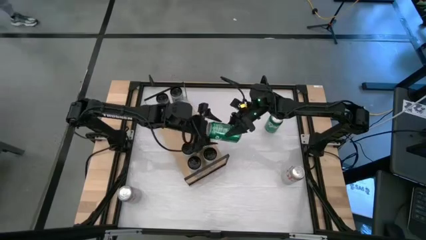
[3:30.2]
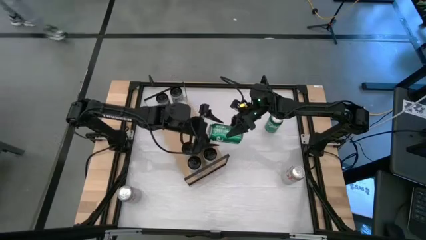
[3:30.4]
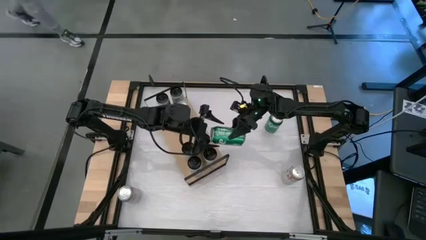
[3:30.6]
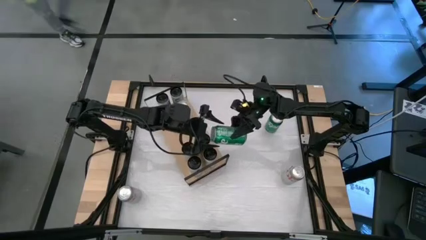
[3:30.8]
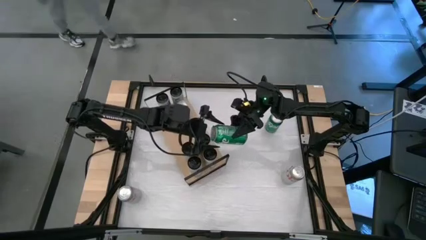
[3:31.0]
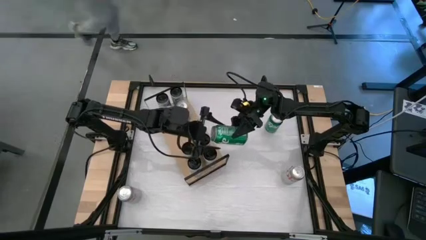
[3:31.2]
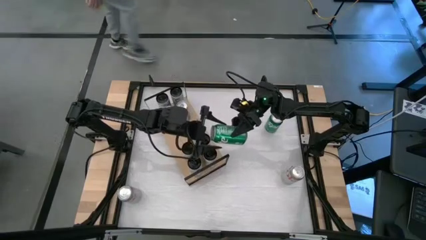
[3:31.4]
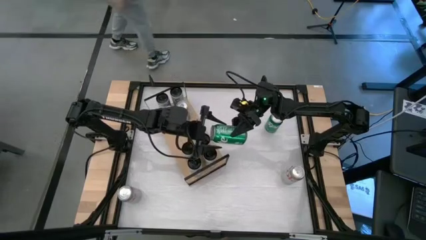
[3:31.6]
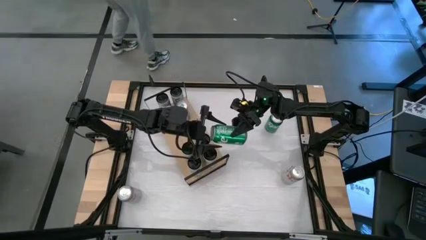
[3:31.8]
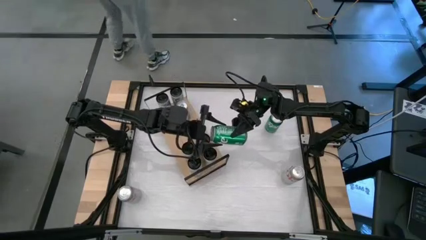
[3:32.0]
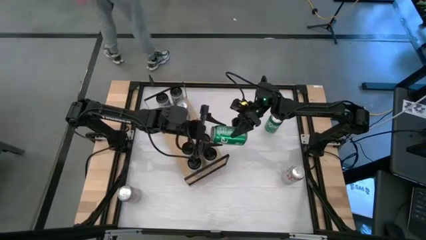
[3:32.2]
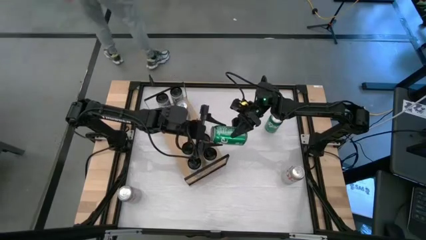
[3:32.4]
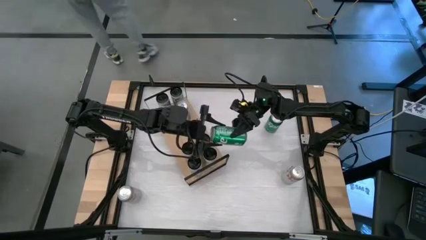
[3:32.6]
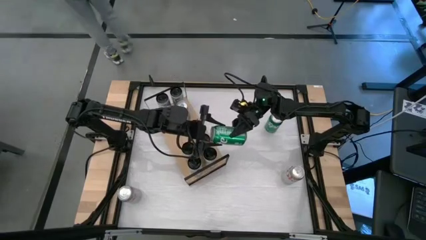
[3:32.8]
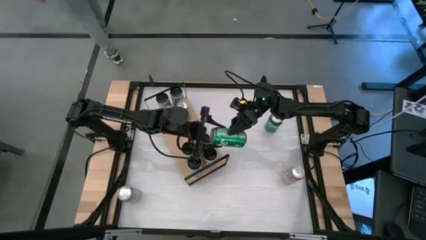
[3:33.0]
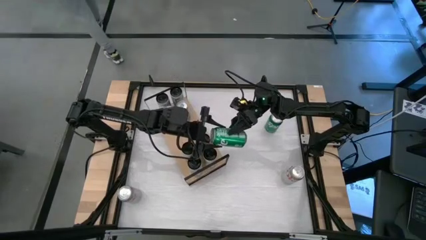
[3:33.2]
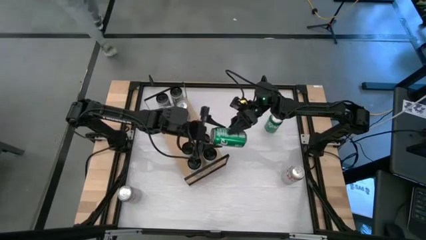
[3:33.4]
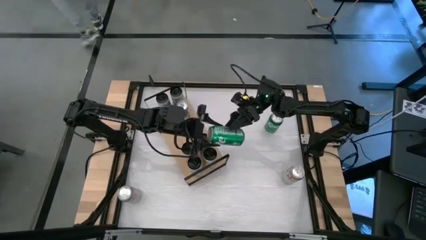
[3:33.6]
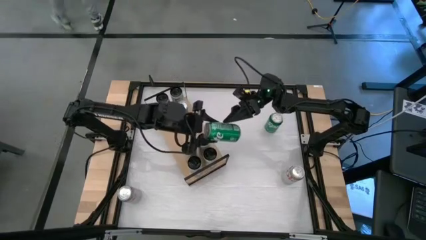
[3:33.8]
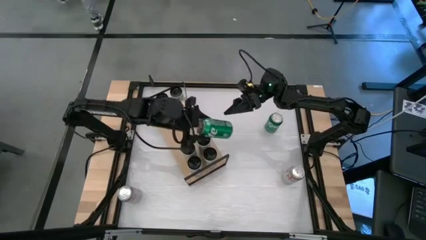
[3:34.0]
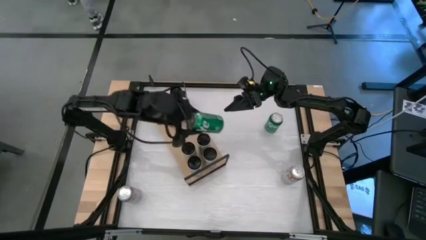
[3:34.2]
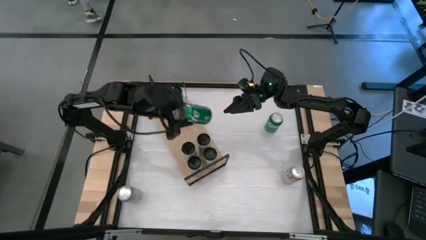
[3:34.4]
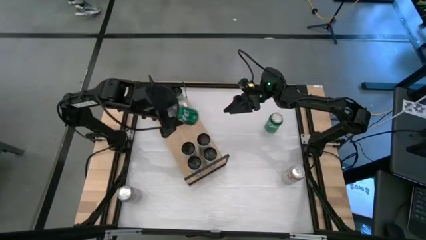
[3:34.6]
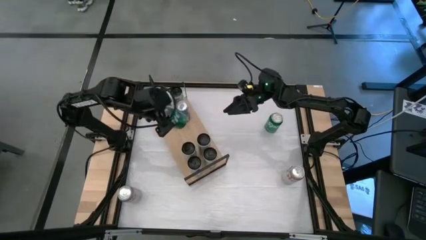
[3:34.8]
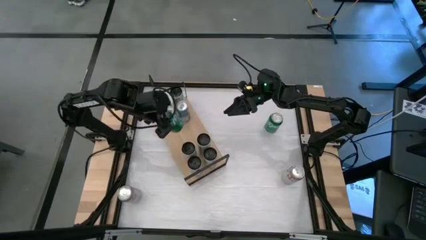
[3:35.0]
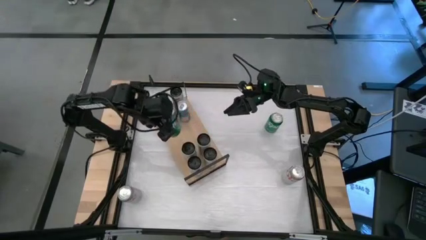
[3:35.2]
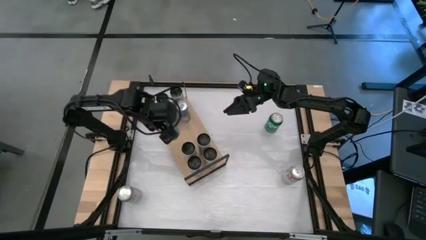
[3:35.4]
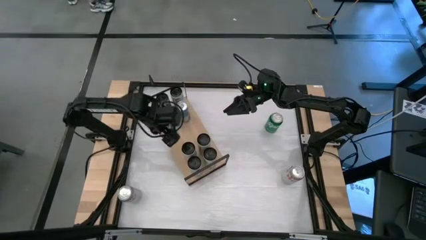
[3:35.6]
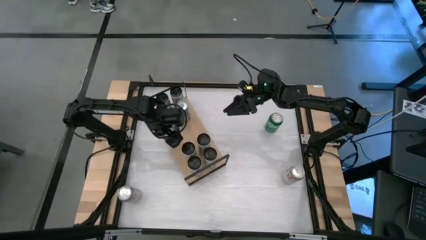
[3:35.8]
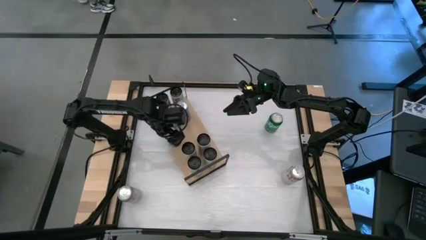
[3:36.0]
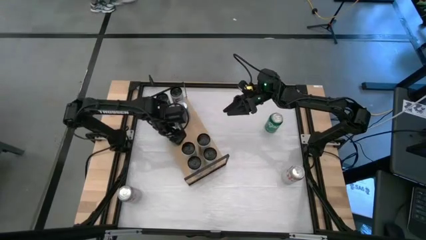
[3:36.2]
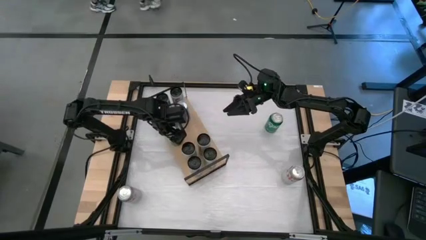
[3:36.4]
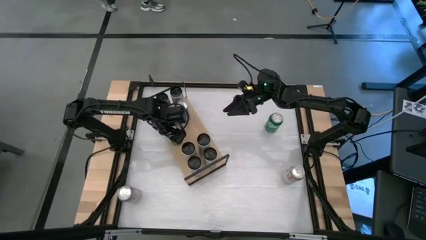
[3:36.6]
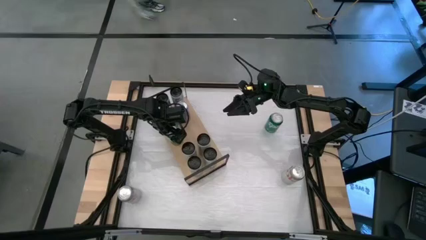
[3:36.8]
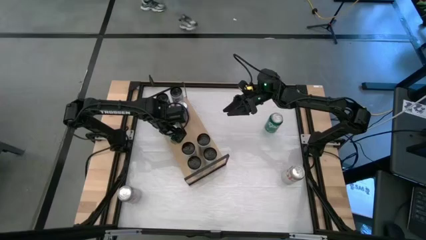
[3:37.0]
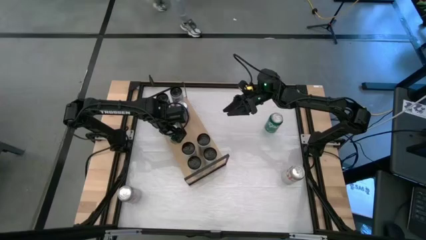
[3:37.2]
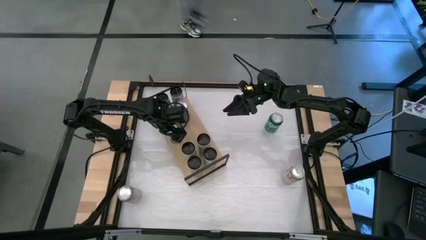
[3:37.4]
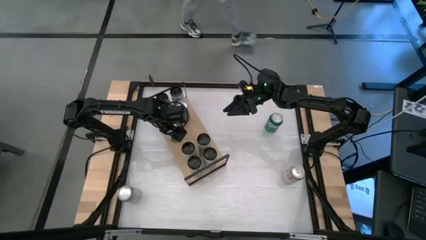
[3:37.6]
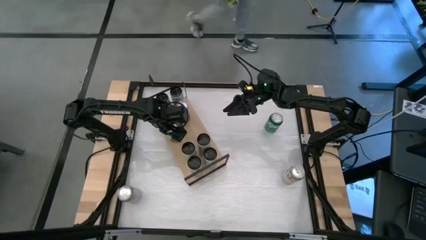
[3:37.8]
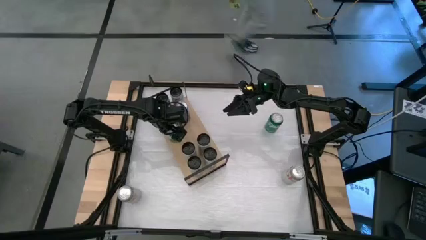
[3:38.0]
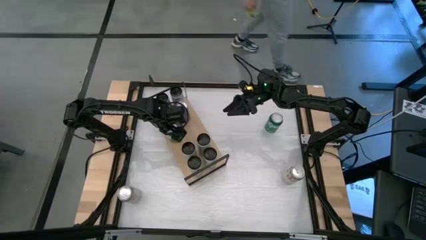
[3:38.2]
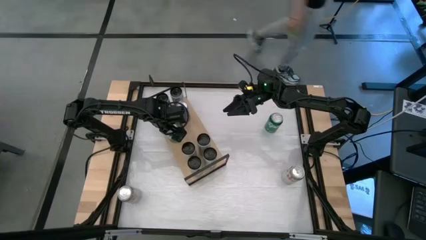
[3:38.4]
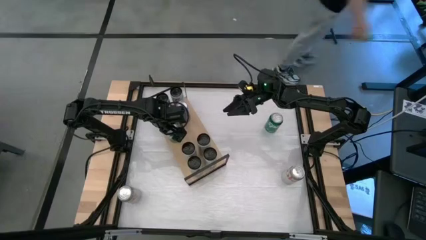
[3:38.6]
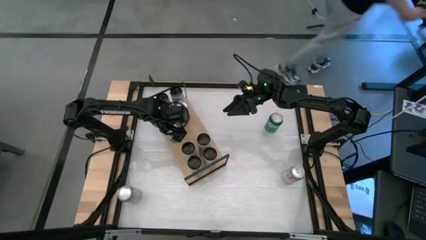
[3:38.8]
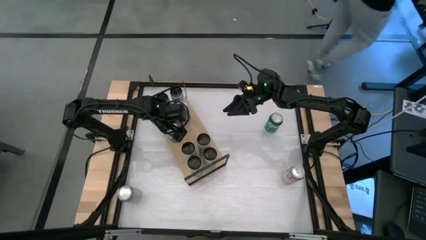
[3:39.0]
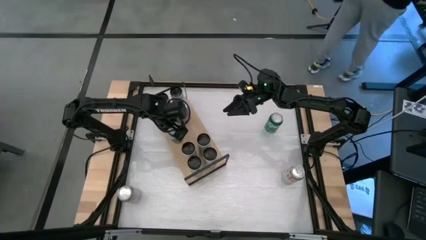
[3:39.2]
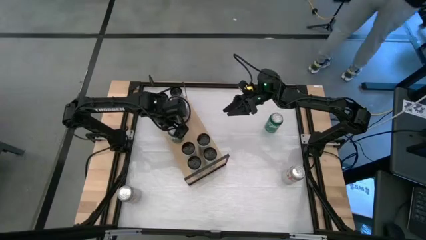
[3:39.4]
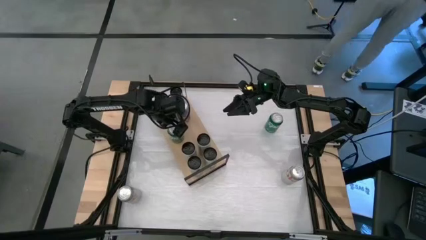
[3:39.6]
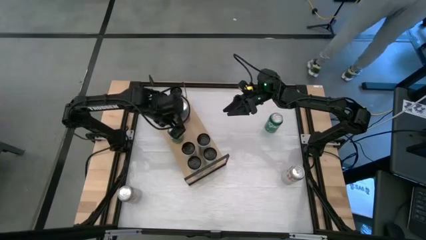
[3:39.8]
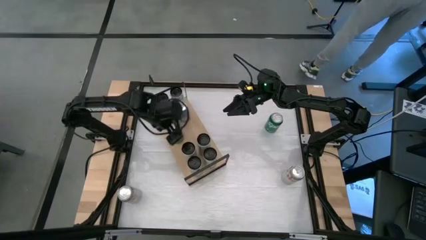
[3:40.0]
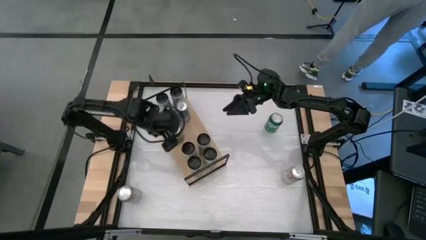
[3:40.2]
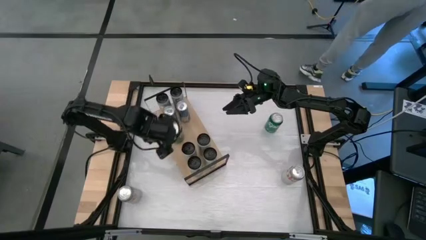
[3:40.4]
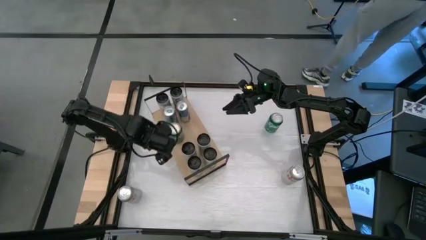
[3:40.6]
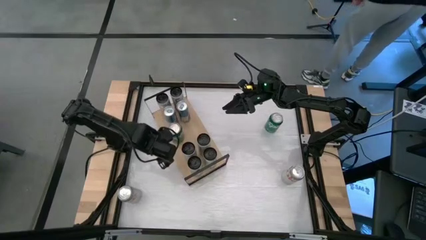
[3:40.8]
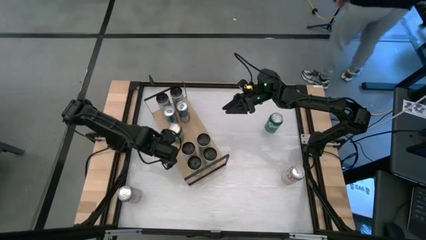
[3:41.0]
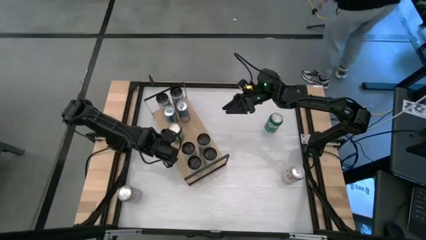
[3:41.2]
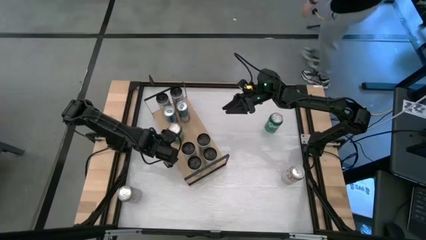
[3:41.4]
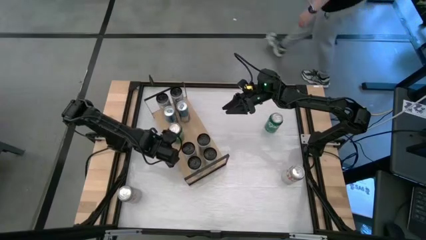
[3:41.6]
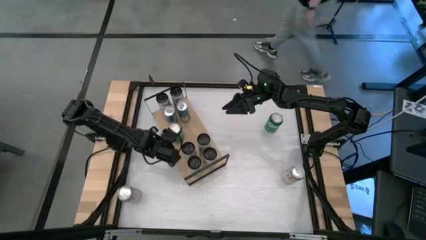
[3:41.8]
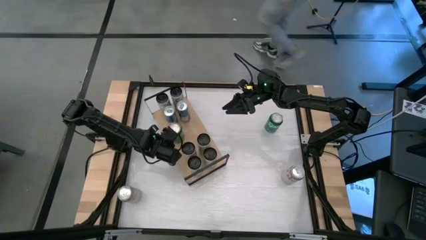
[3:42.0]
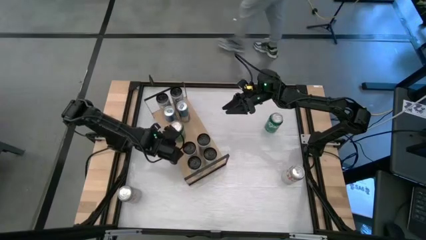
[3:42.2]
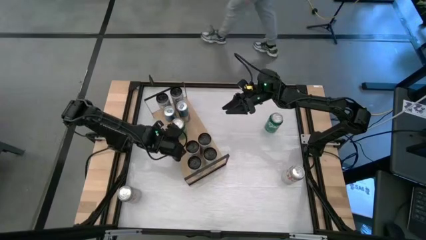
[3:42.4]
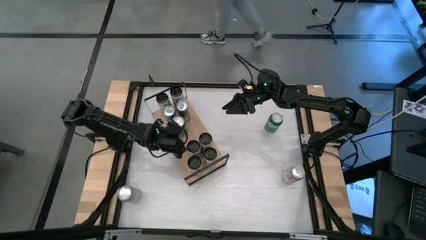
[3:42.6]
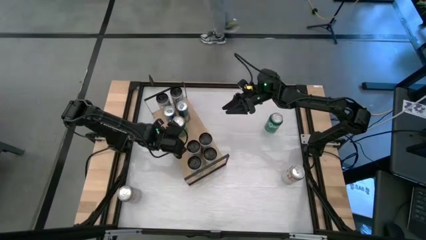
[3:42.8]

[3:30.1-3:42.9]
Task: Place canned beverage on shelf
Put the green soda can on the shelf

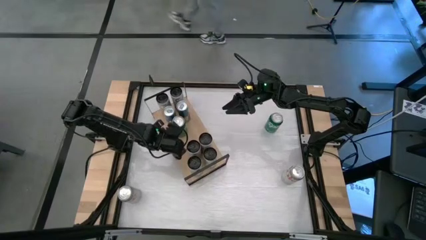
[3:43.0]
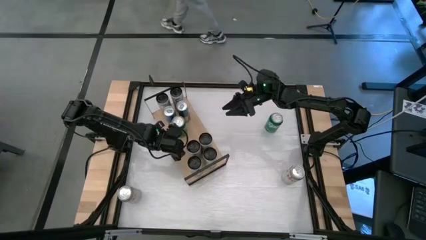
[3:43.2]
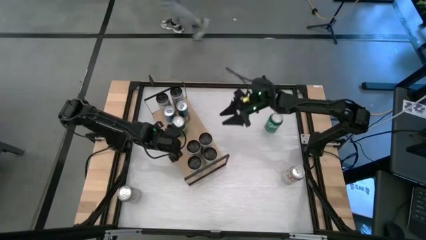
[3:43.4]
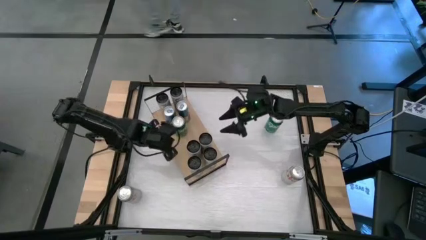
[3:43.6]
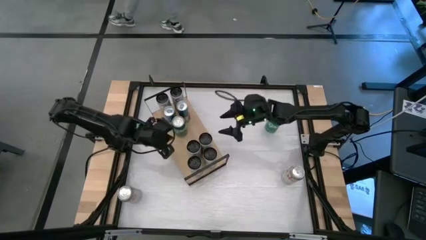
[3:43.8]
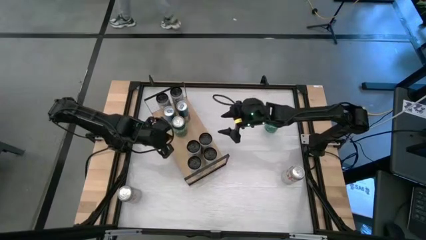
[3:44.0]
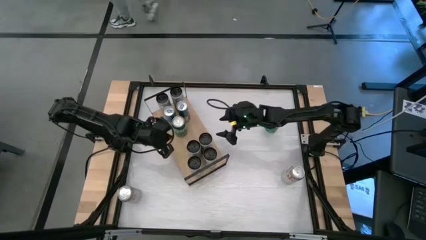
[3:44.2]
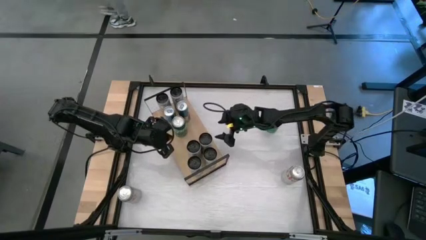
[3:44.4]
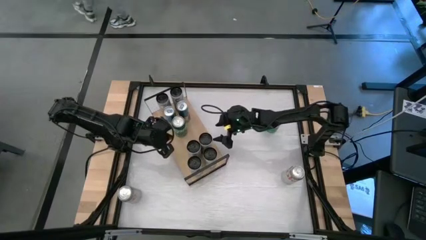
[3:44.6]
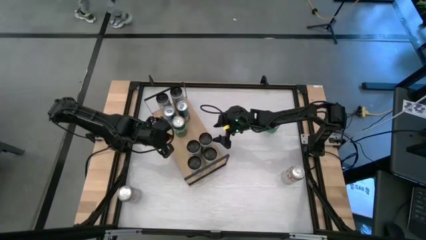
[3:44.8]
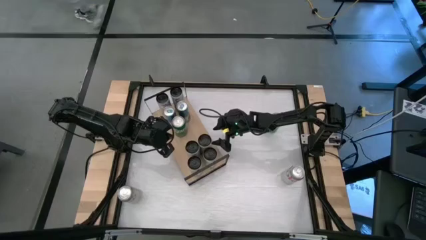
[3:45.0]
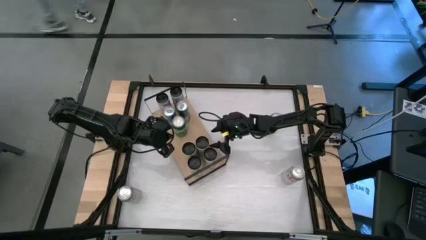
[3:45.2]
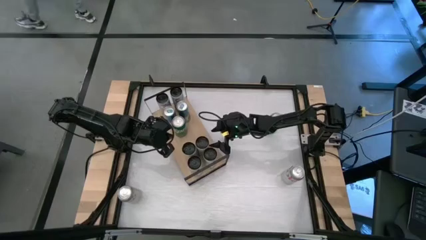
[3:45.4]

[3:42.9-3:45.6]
Adjust the white and yellow soda can on the shelf
